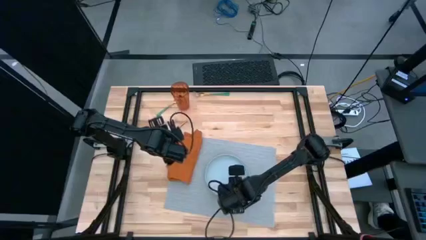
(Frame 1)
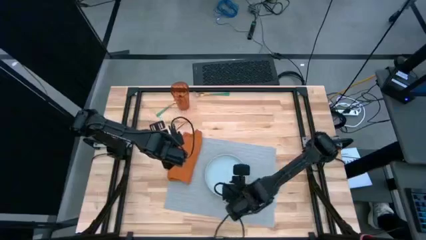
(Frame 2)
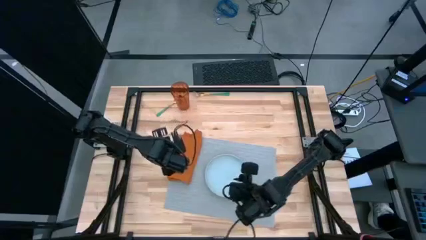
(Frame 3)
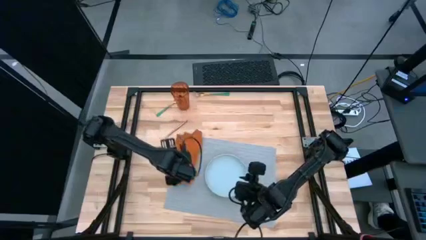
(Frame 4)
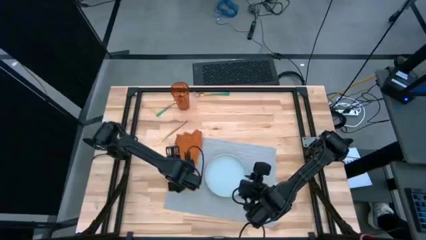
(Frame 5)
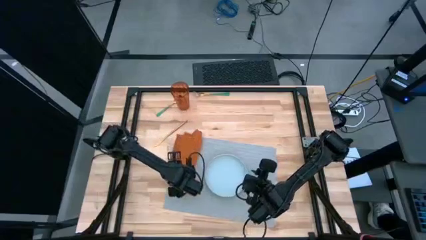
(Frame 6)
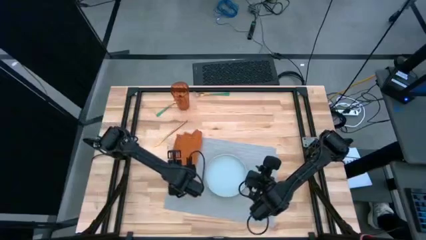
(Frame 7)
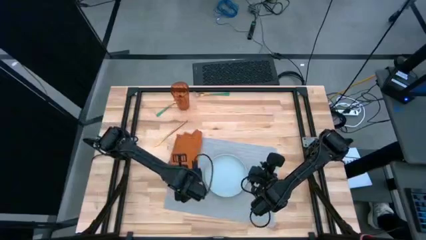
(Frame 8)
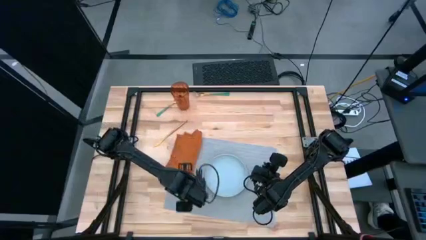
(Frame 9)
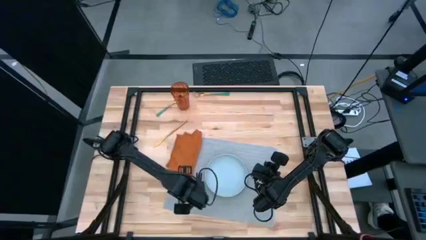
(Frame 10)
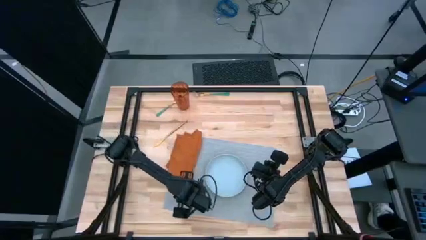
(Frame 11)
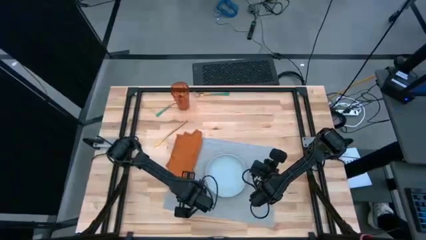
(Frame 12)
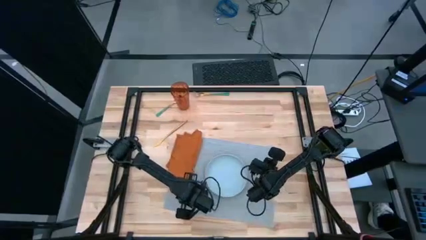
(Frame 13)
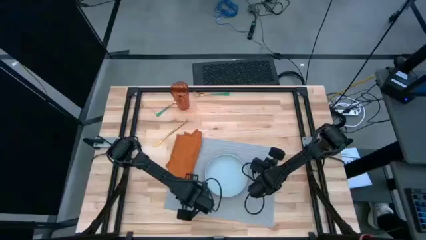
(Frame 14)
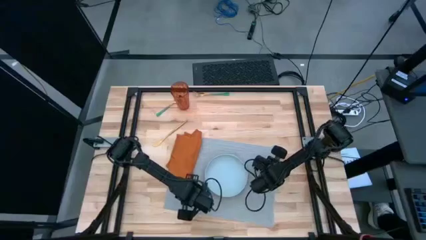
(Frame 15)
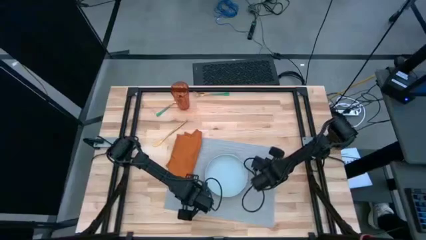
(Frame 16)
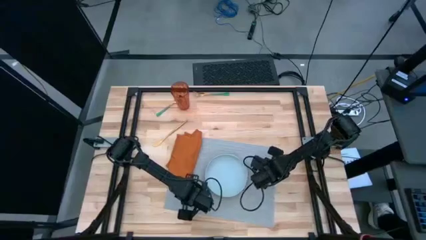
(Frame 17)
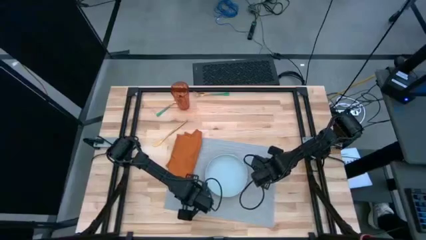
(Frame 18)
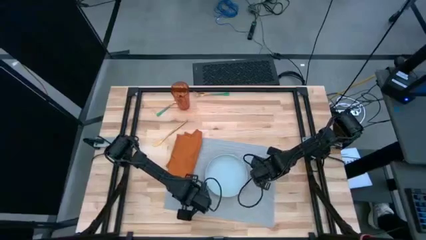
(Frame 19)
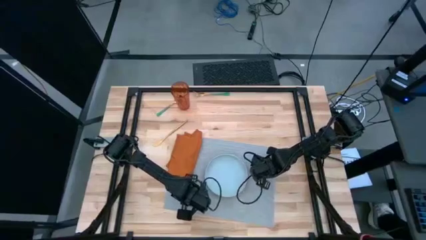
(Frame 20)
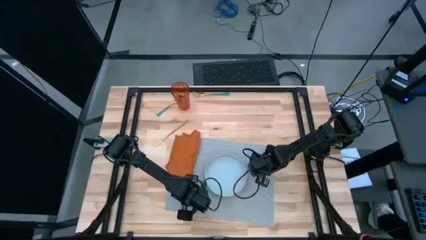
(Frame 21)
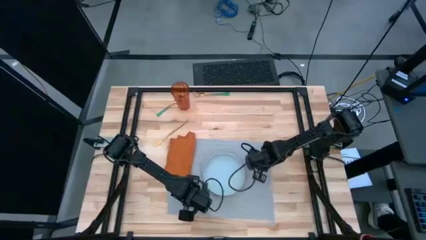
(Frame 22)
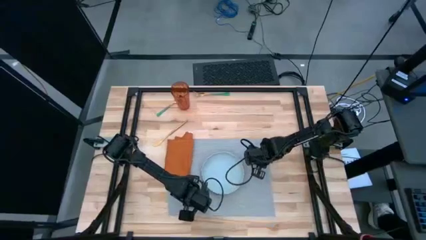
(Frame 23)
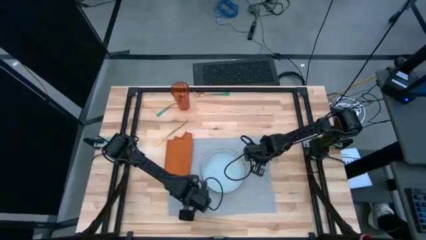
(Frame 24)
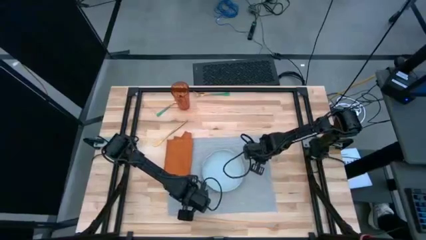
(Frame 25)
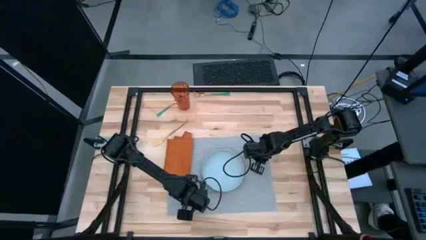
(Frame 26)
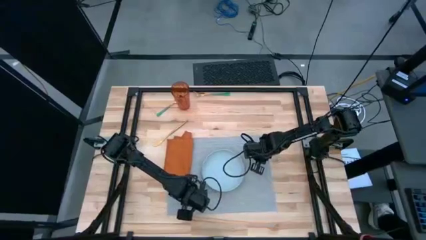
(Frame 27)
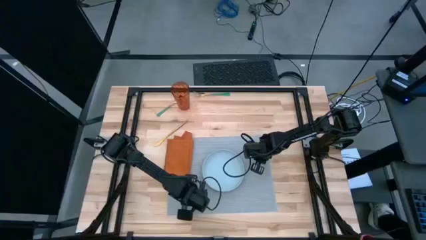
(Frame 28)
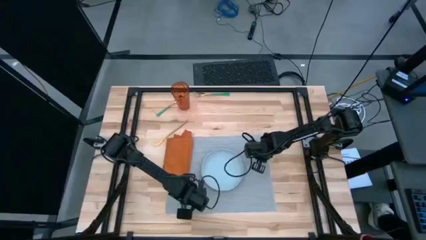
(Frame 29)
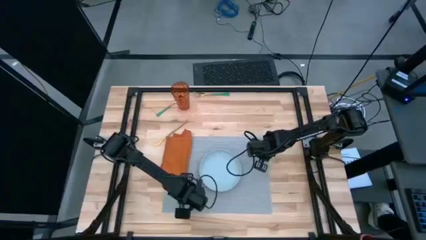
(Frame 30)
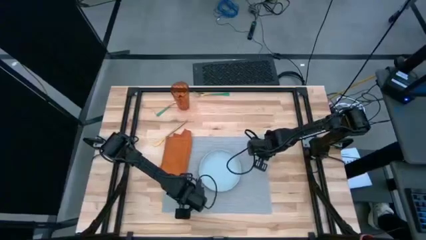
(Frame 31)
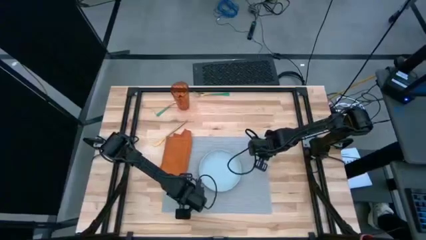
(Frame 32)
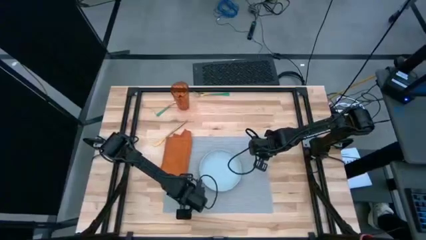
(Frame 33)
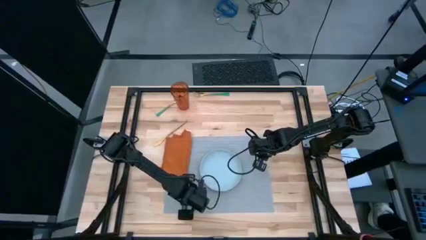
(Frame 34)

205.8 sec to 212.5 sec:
Task: Set table place
Adjust the gray table mat

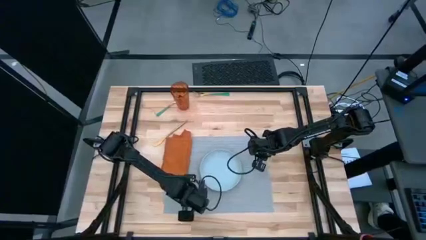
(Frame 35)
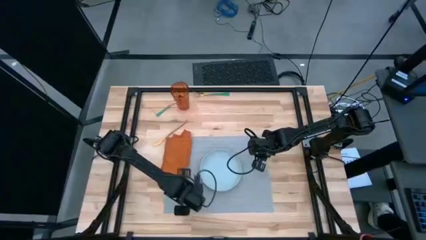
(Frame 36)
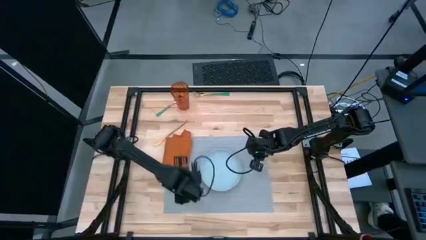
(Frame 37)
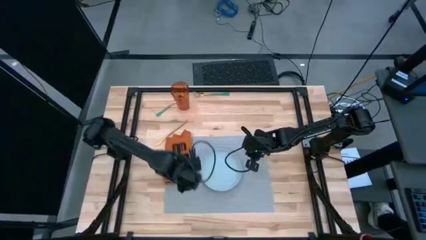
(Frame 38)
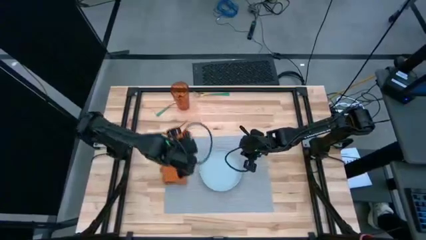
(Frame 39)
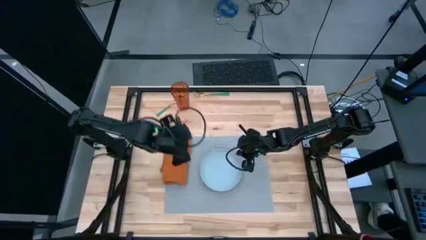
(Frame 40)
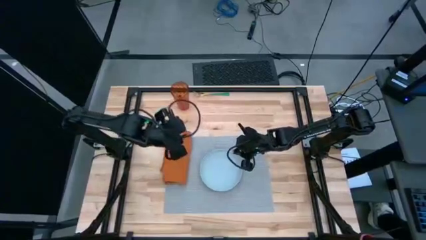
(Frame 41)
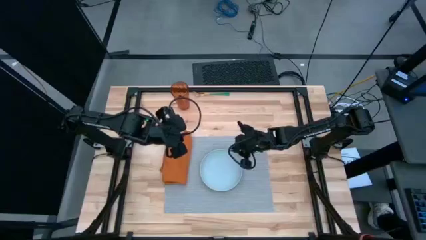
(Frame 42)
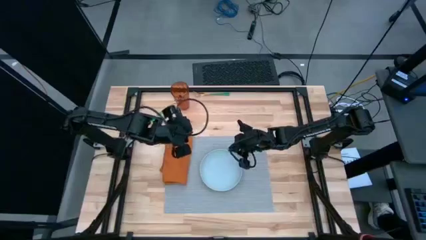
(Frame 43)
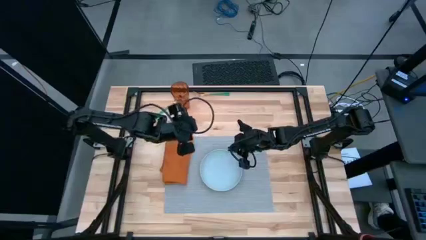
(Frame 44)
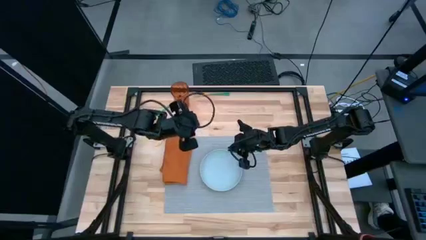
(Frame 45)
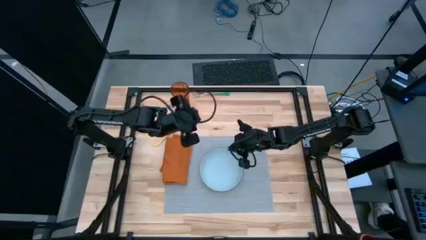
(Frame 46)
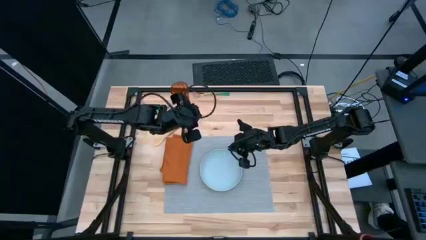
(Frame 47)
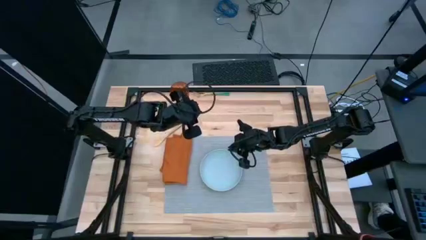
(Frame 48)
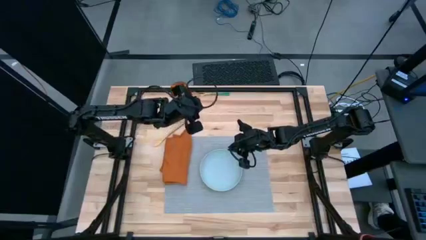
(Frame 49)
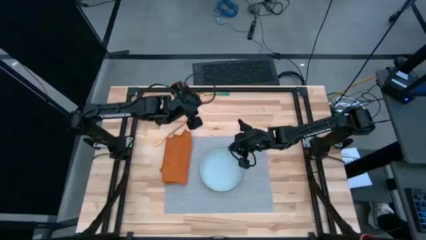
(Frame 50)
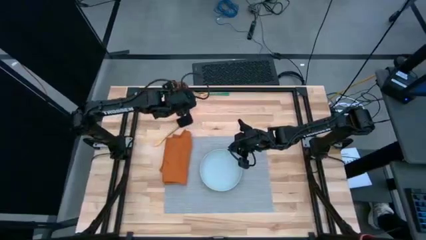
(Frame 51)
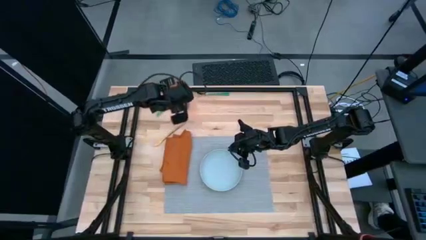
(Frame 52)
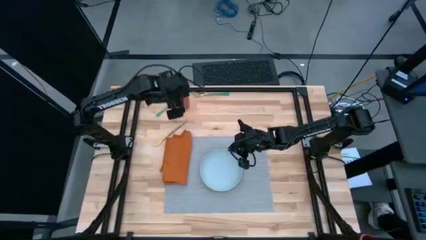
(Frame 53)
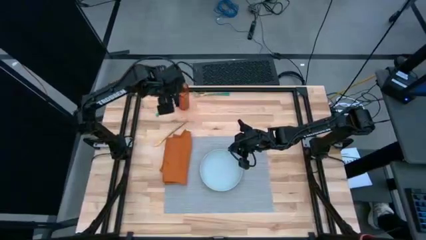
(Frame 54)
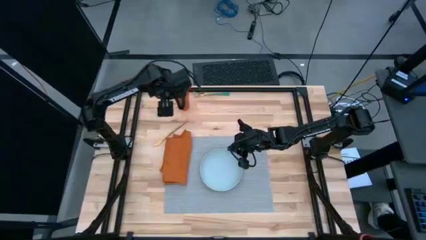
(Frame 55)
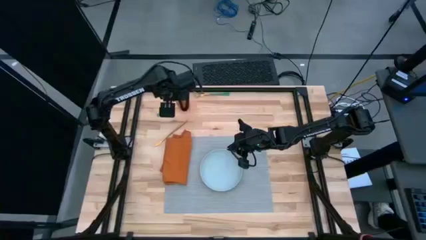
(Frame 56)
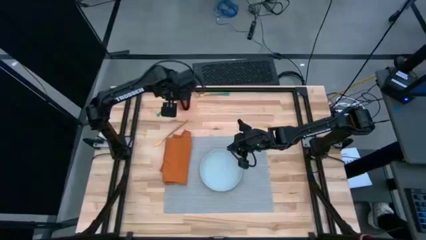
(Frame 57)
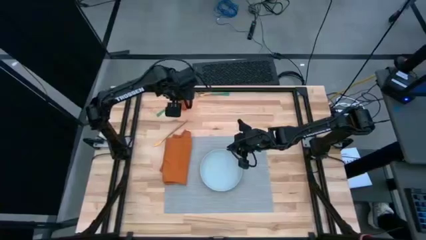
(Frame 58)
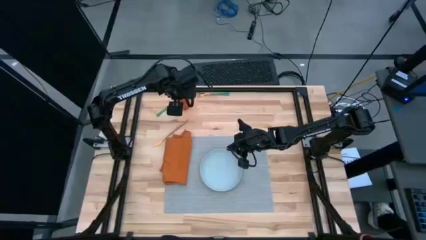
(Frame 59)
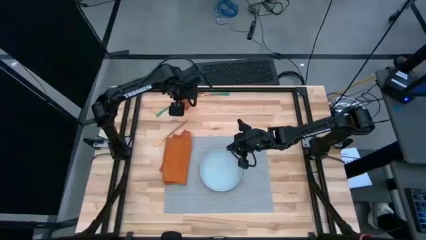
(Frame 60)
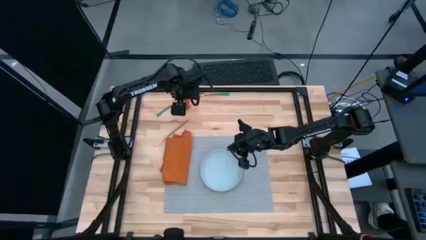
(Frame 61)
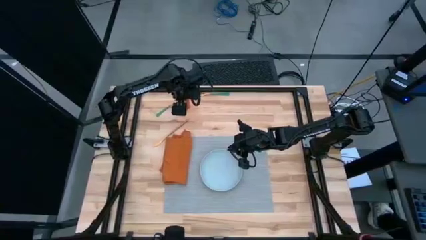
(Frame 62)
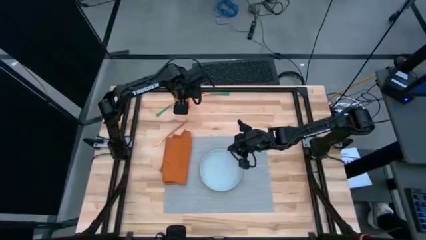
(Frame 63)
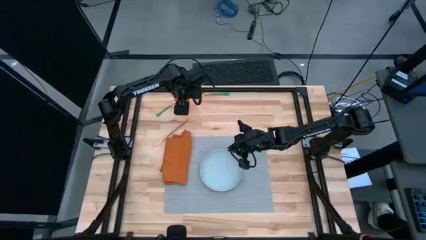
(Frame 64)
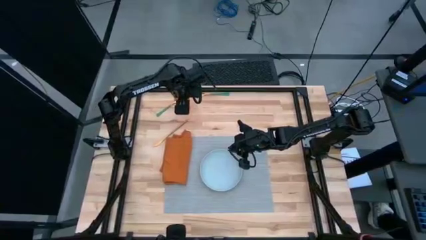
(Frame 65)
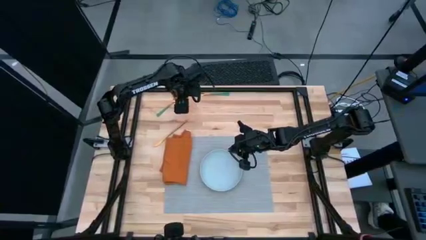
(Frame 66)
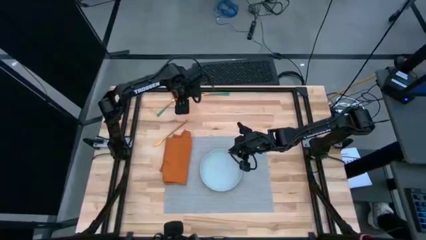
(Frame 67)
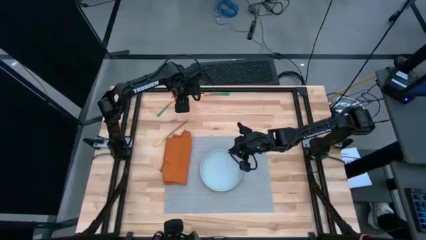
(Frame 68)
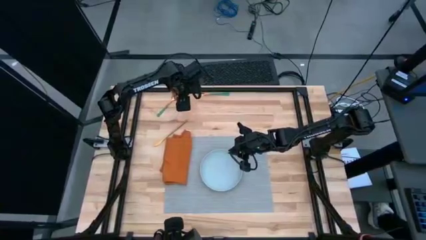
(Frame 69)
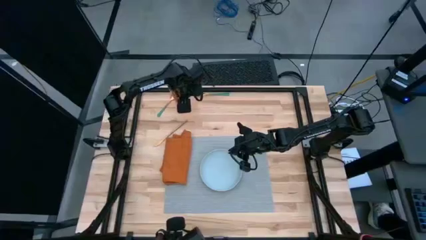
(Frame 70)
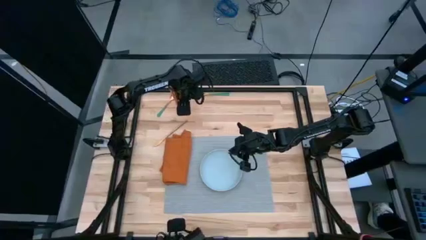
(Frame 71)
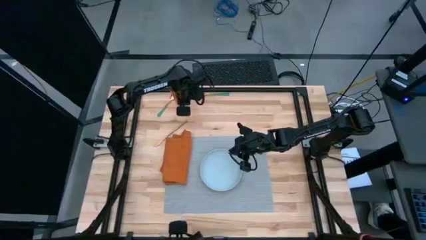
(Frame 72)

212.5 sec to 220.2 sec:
Put the orange cup on the top right of the table

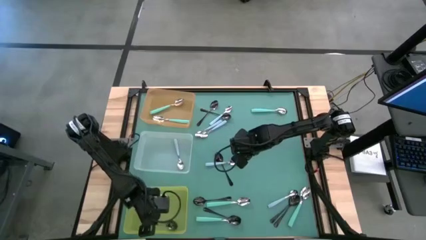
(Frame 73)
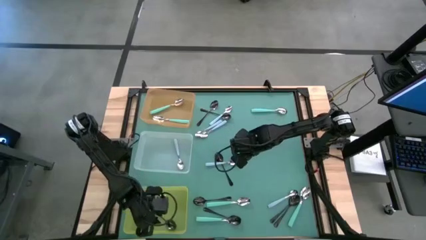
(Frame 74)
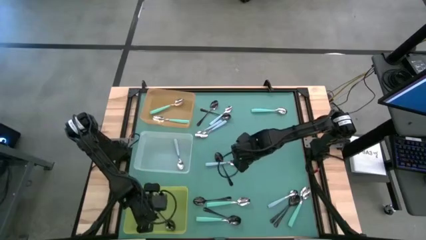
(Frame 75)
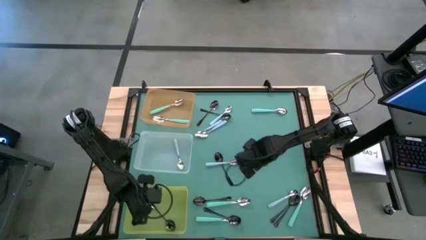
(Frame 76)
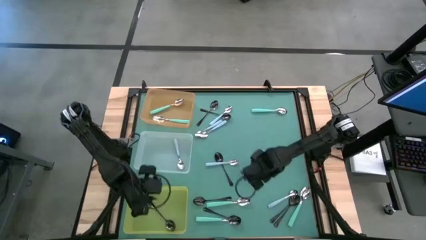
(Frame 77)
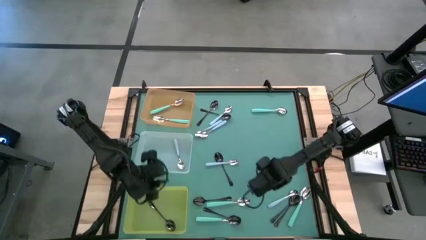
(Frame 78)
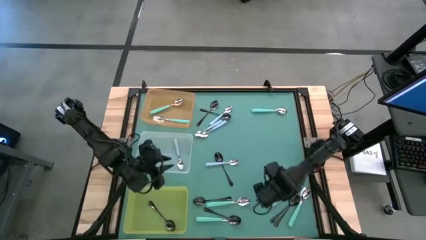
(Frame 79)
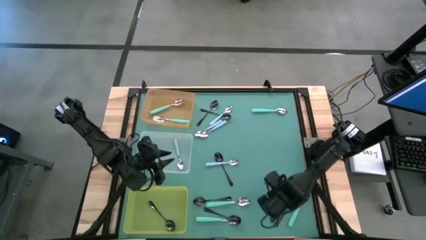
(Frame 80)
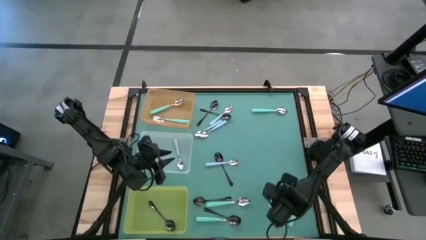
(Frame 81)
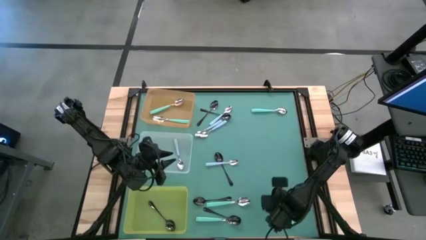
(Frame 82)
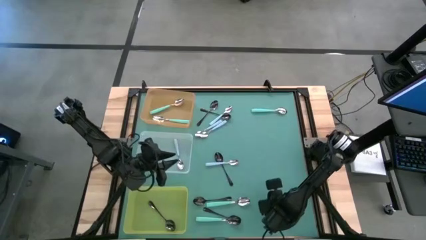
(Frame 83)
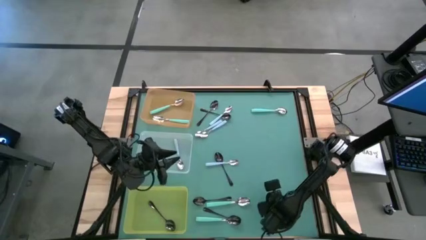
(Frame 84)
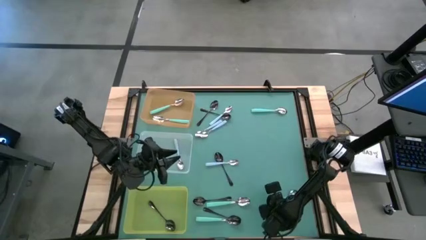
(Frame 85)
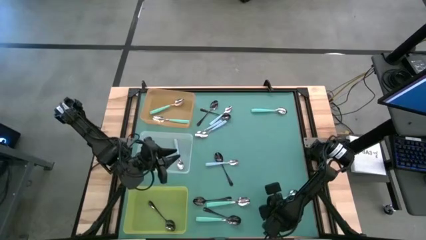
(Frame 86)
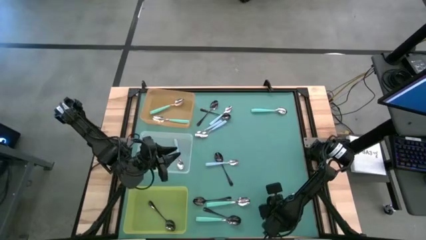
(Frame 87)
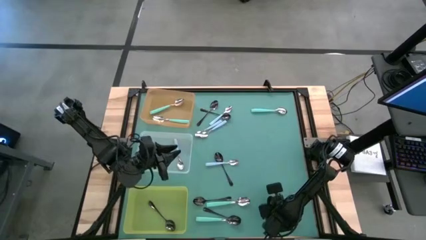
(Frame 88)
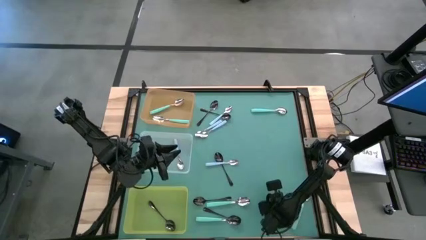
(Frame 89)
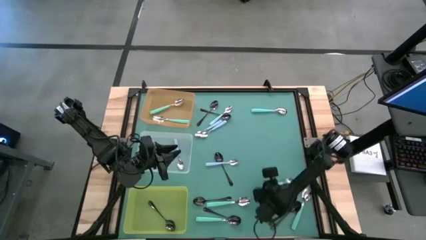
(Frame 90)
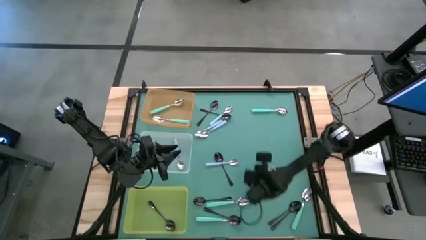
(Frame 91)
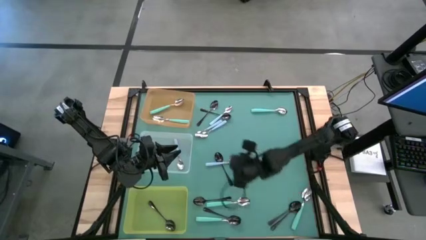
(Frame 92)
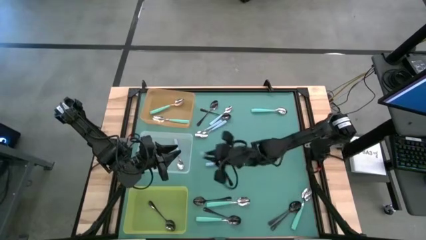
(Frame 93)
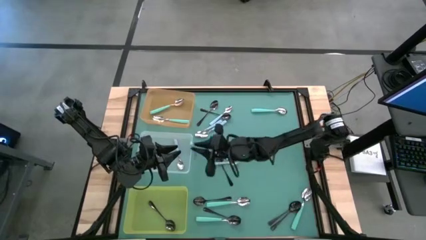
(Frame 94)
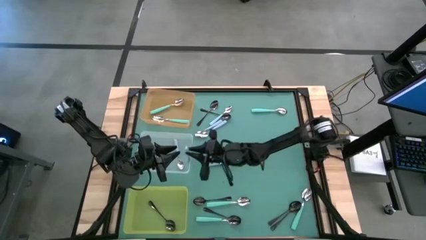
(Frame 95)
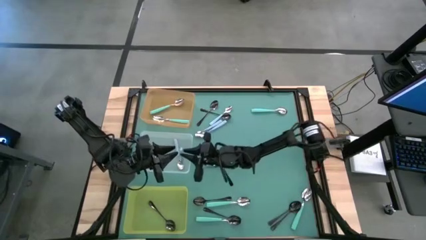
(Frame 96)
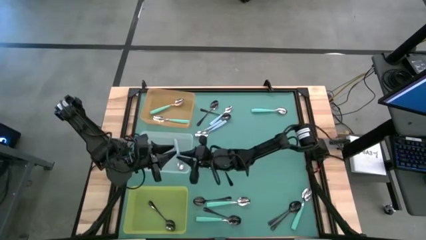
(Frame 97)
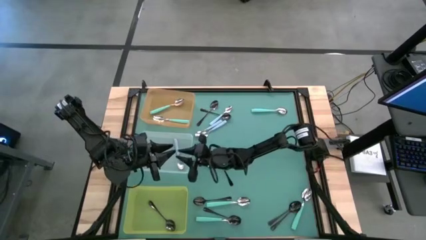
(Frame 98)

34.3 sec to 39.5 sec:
Task: Sort silverware by color (type)
Put the blue spoon into the transparent bin
